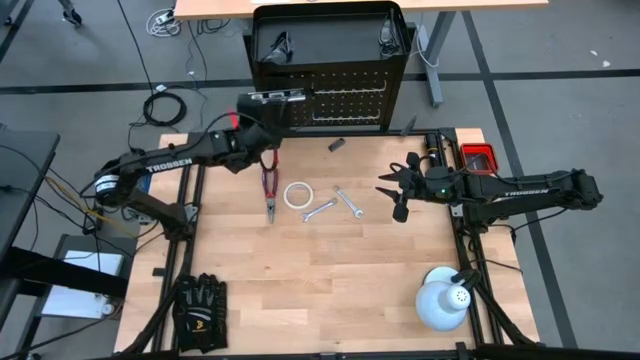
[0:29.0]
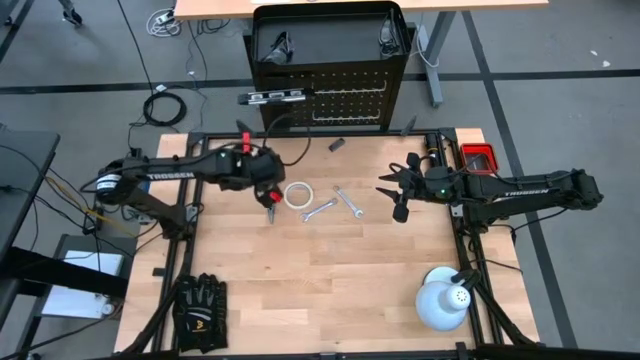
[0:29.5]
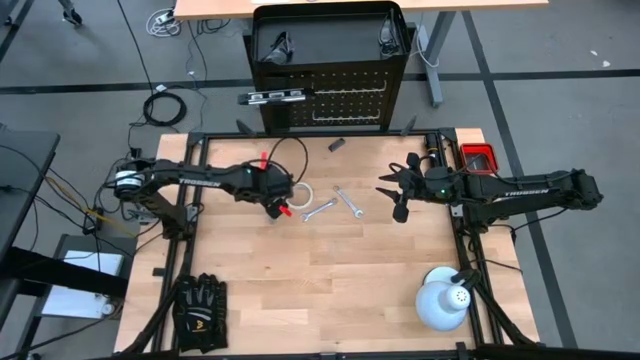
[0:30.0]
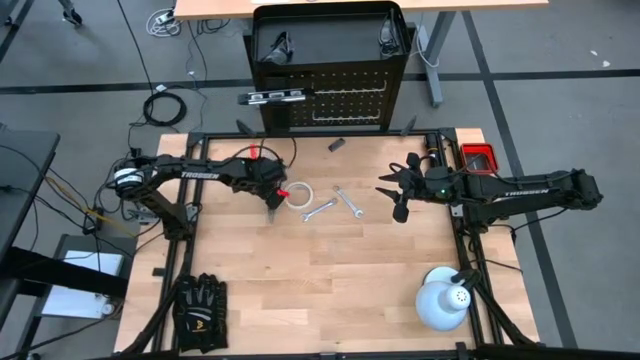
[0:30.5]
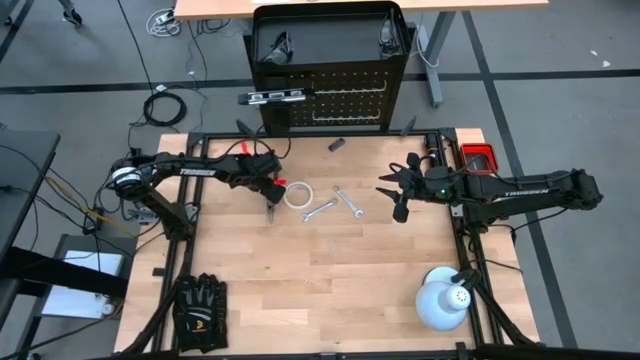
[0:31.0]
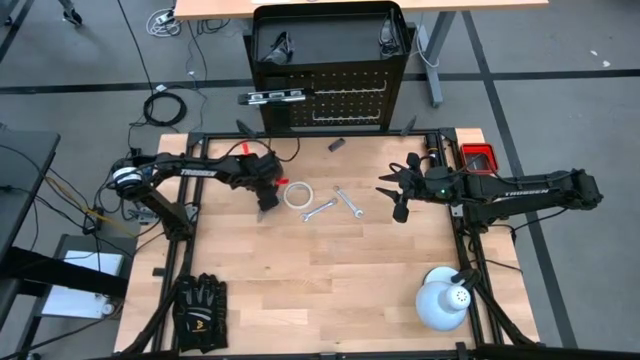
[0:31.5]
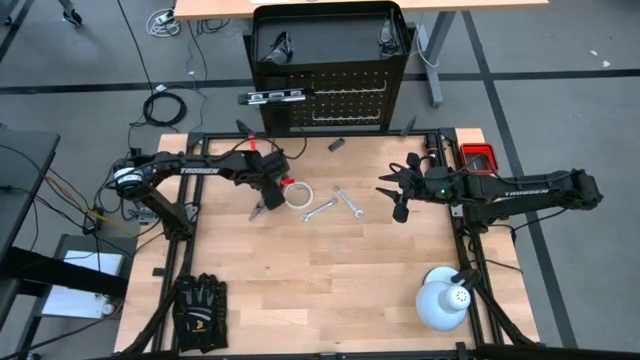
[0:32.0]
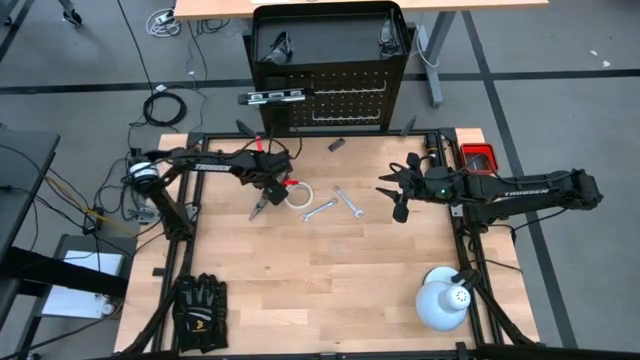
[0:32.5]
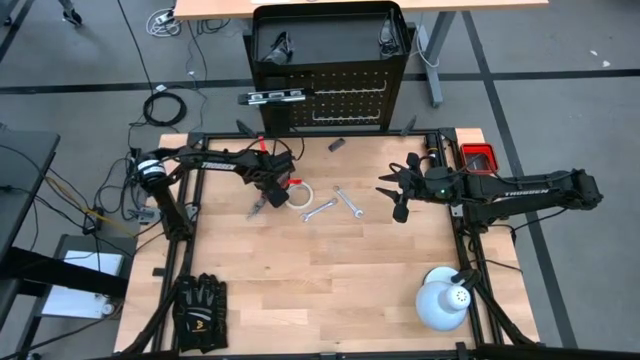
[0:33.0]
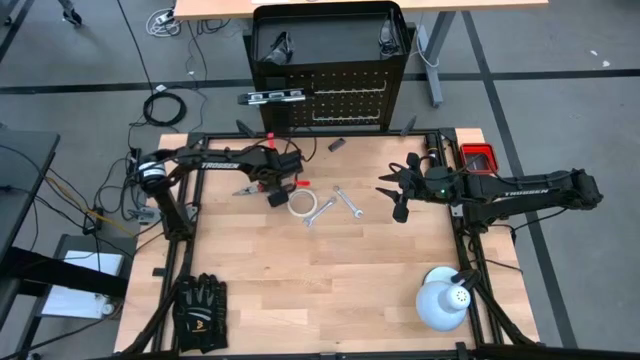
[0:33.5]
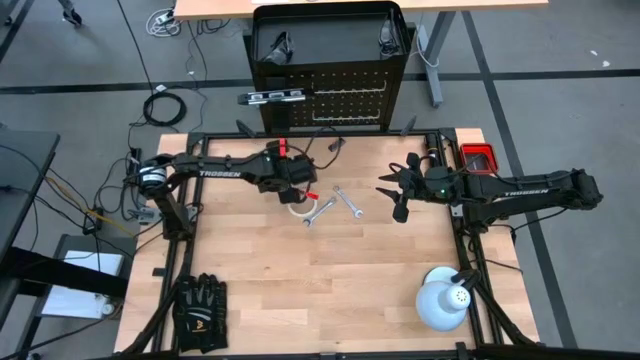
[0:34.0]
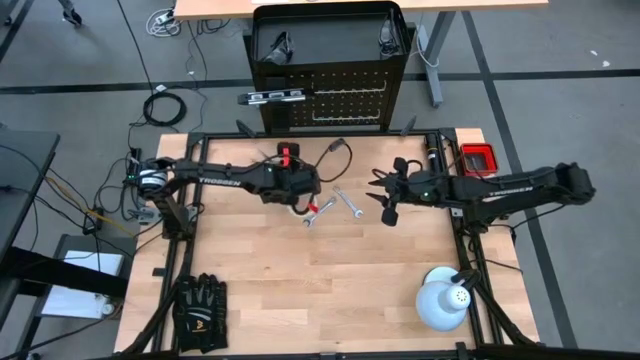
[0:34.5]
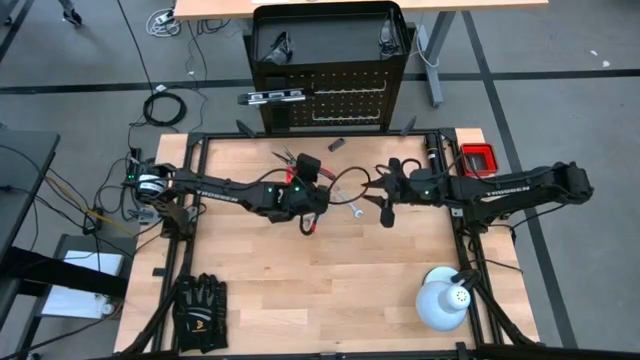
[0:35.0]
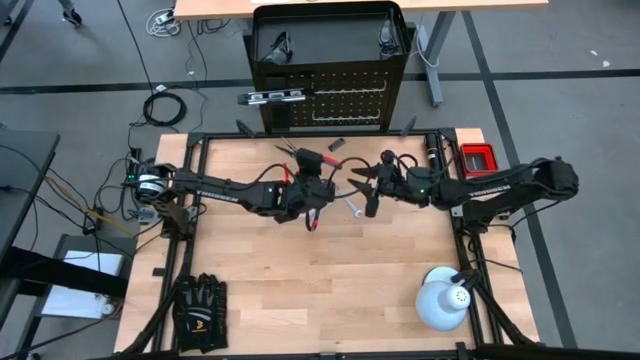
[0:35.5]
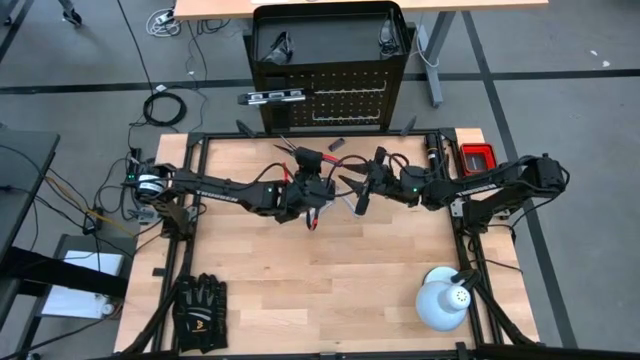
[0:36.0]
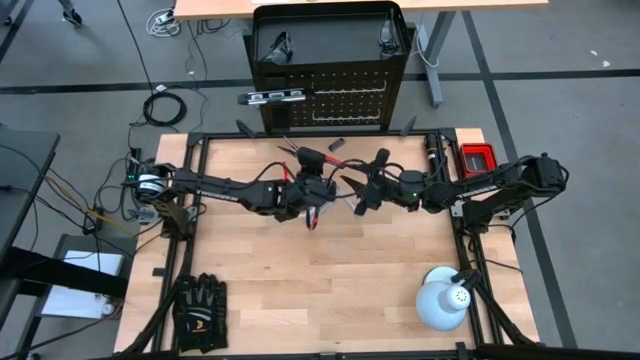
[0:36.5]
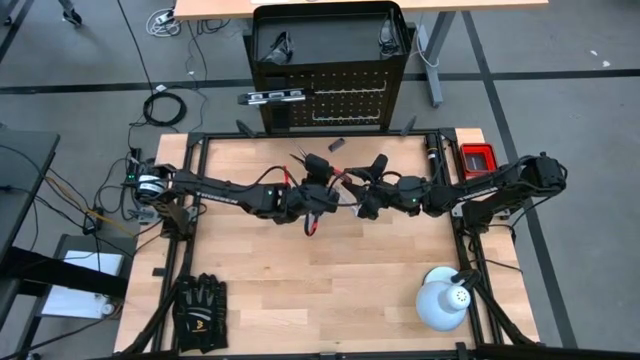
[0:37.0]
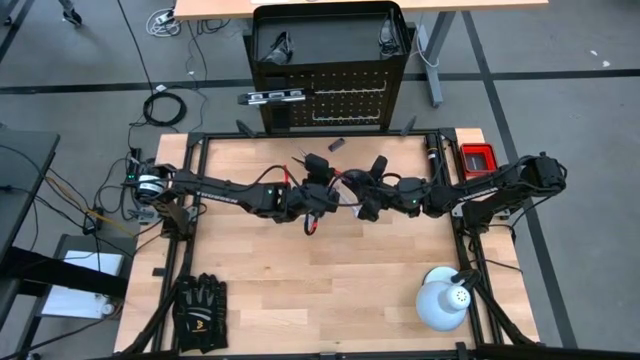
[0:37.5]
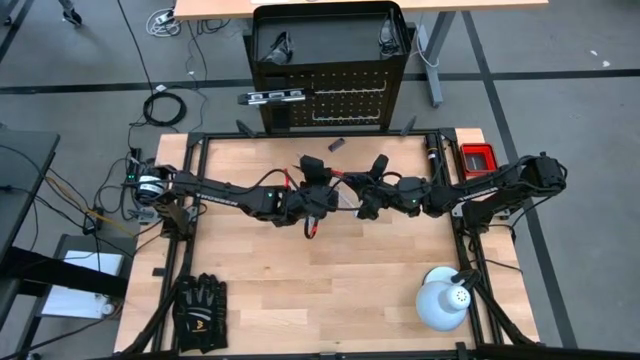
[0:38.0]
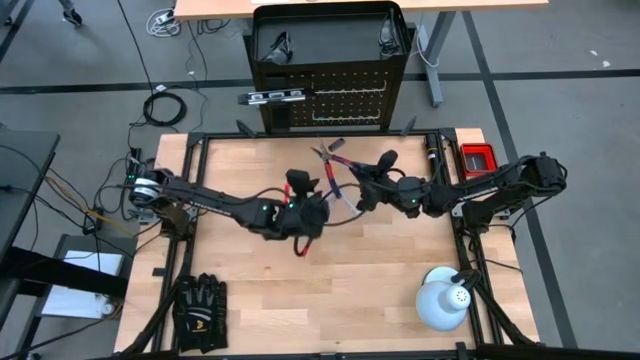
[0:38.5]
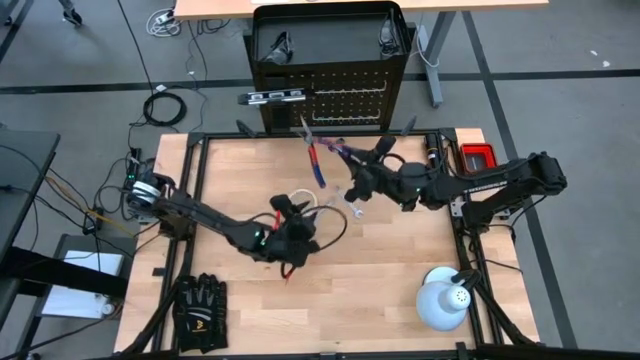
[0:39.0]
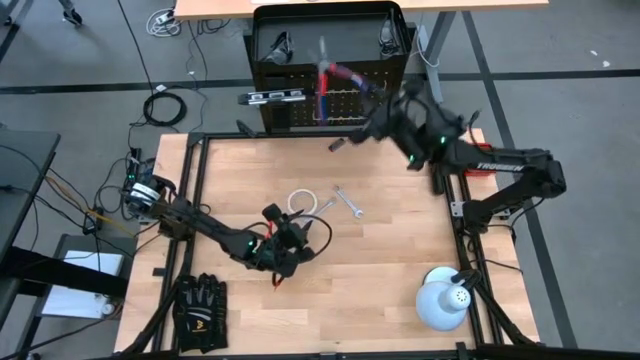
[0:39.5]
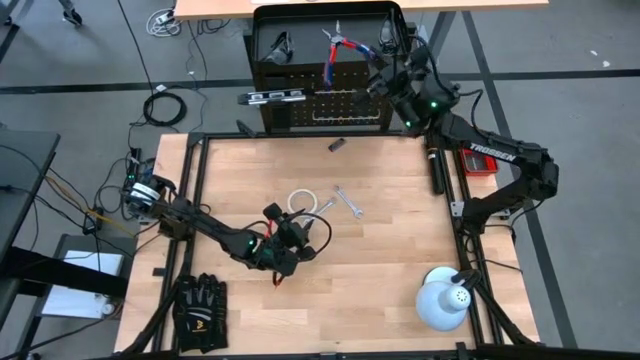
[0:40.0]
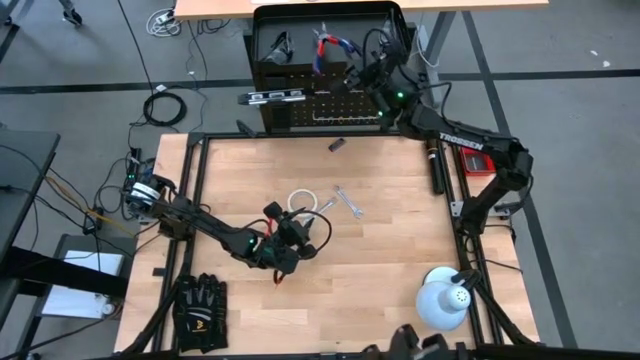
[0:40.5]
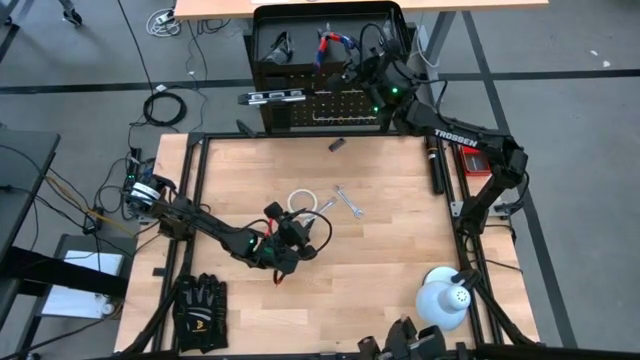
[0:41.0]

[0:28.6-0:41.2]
Task: Hang tools onto peg board
Put the blue pliers on top of the peg board

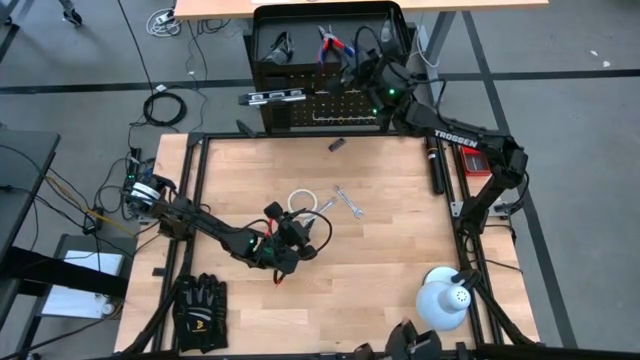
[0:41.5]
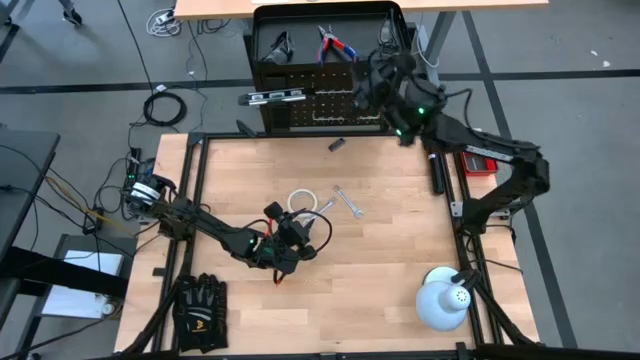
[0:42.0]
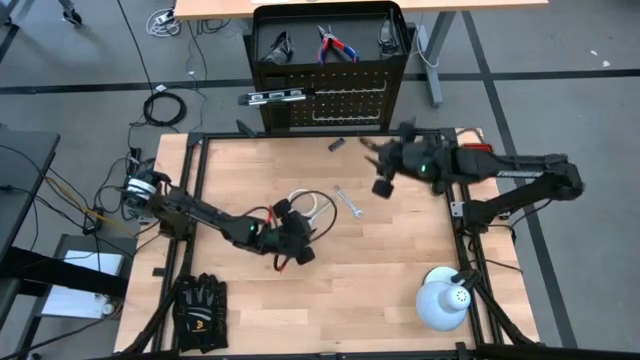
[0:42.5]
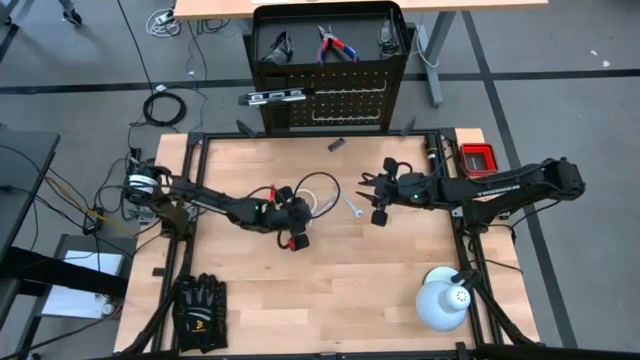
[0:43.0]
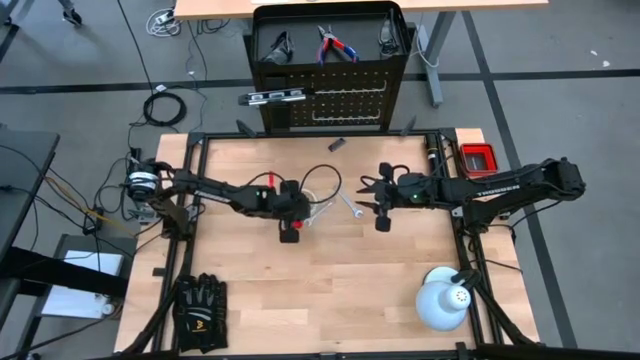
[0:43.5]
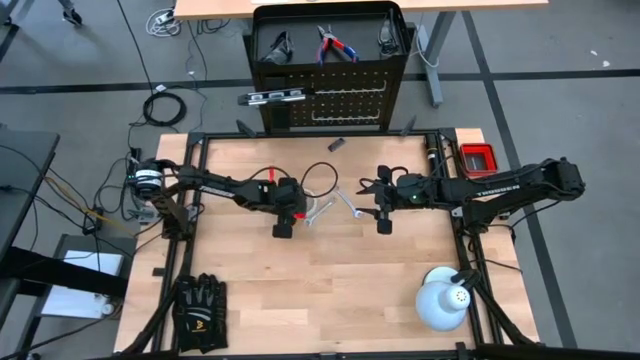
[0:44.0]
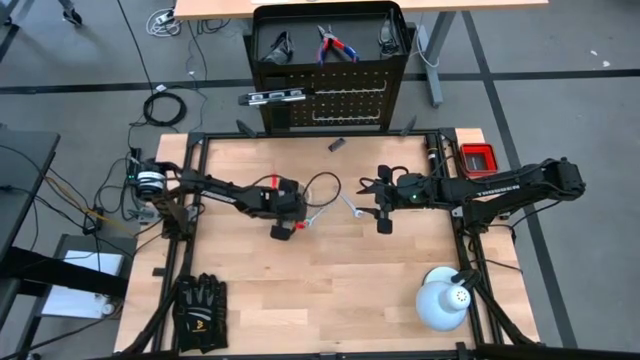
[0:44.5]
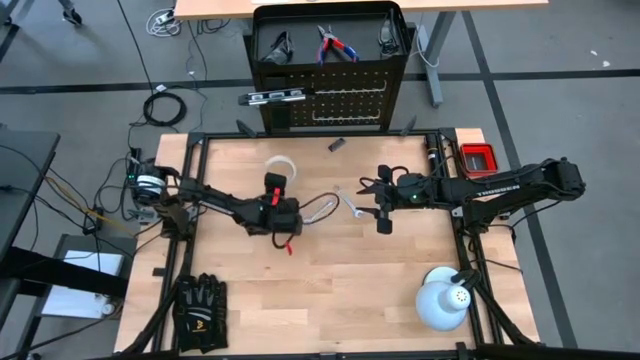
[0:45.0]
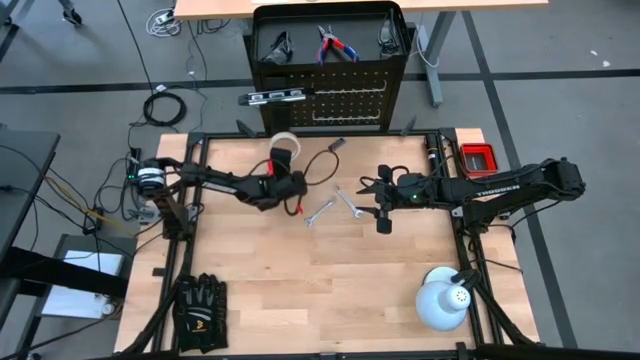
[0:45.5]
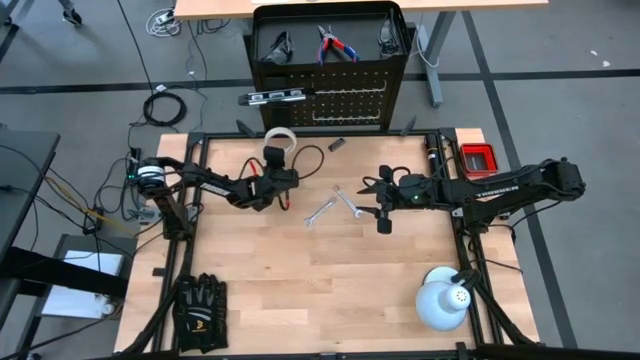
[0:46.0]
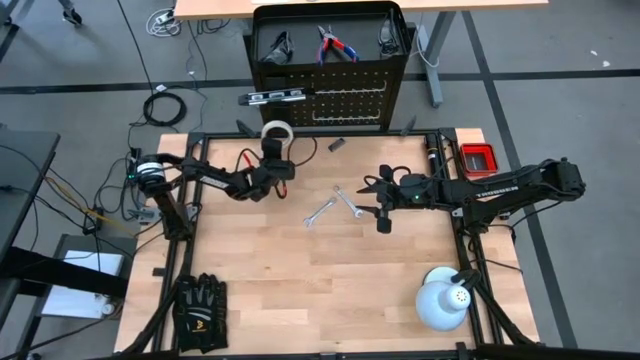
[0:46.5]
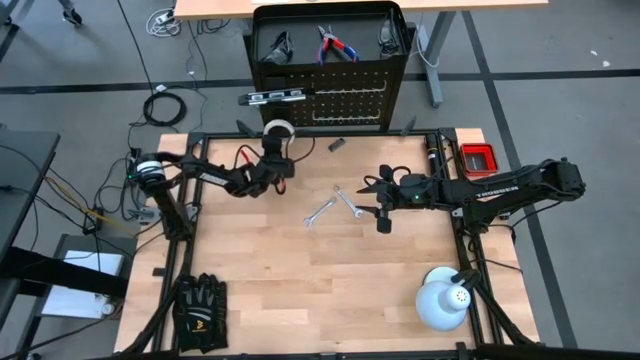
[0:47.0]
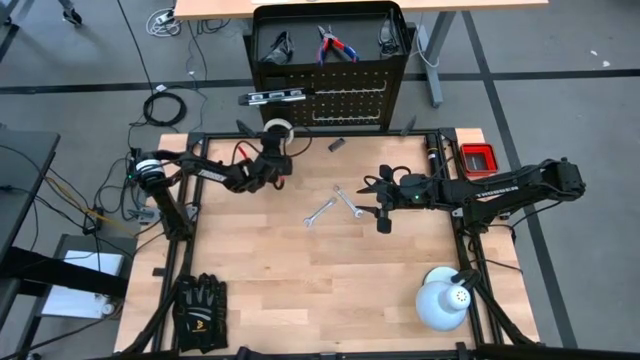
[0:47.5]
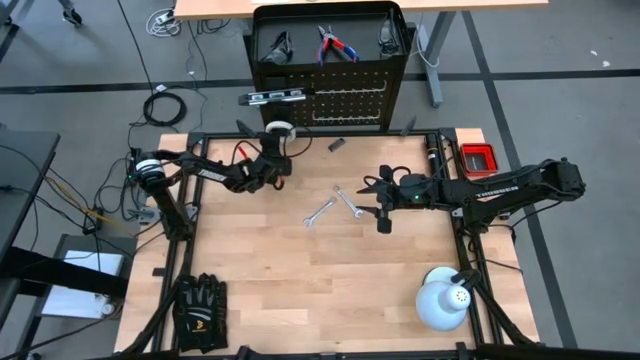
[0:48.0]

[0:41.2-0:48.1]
Hang the white tape on the peg board

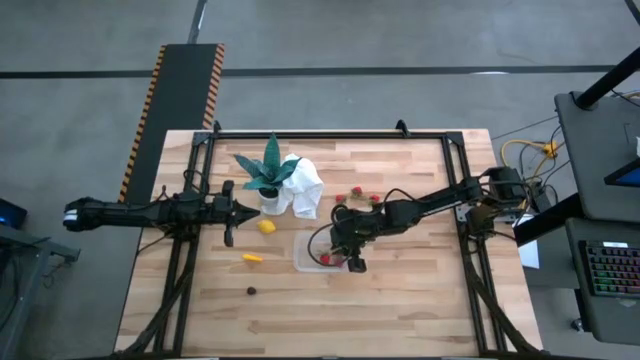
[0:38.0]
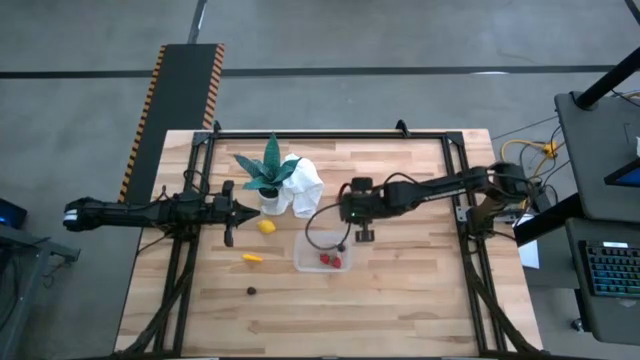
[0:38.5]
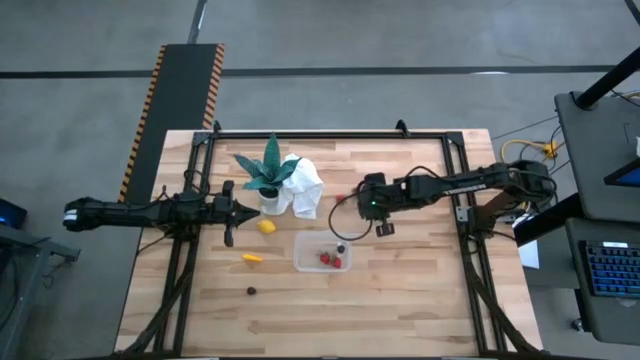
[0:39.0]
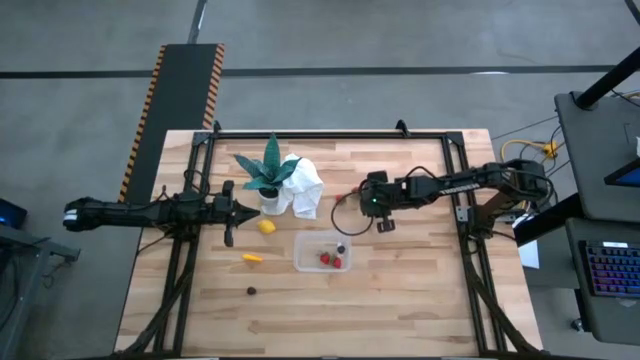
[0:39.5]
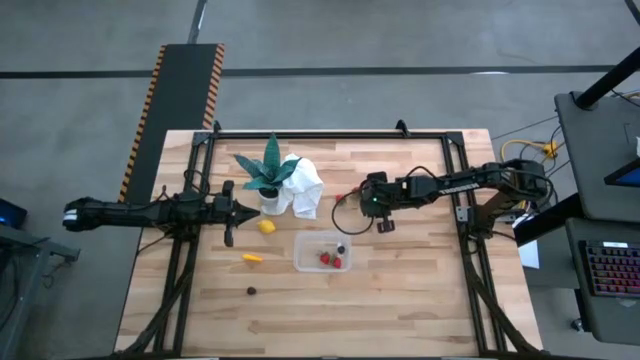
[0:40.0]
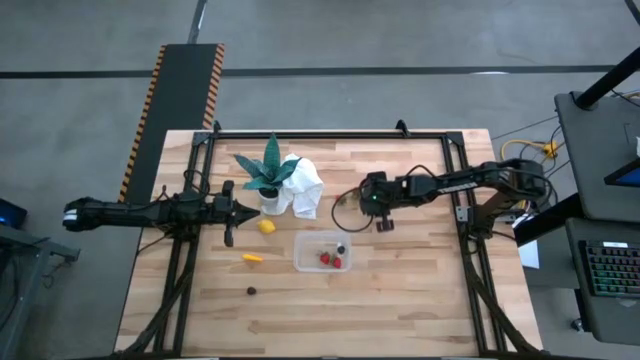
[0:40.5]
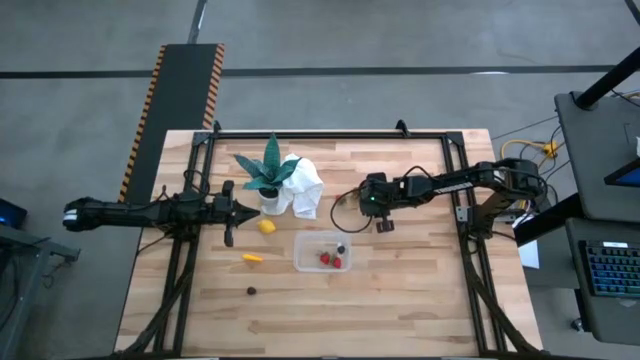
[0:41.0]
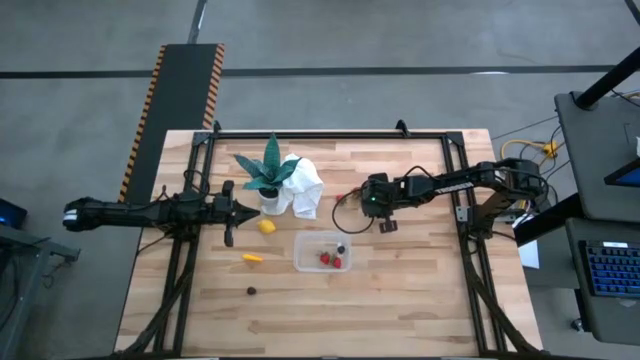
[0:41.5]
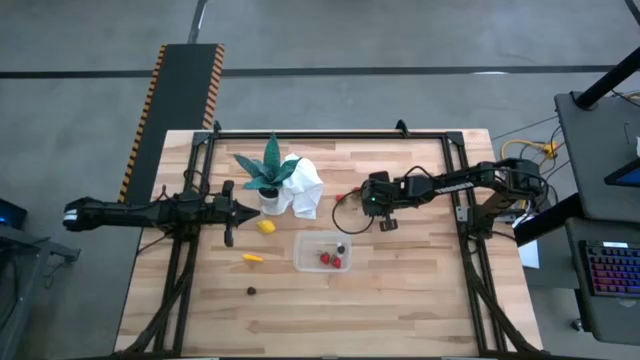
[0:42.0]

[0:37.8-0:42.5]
Task: Pick and placing Produce into tupperware
Put the strawberry into the bin
